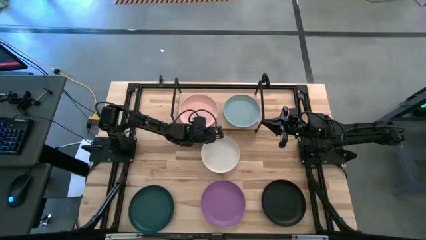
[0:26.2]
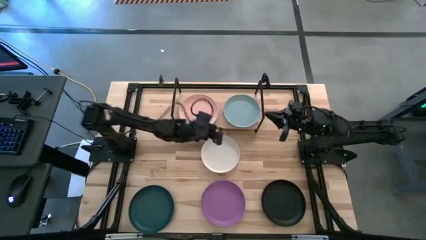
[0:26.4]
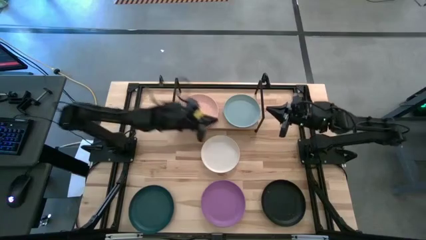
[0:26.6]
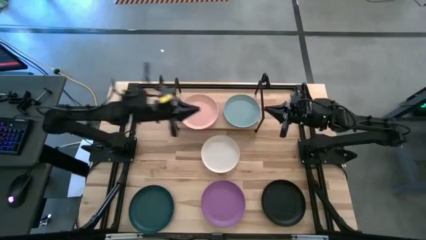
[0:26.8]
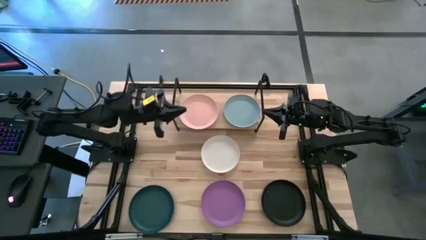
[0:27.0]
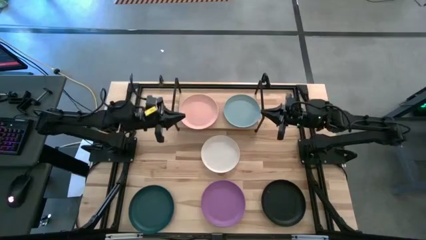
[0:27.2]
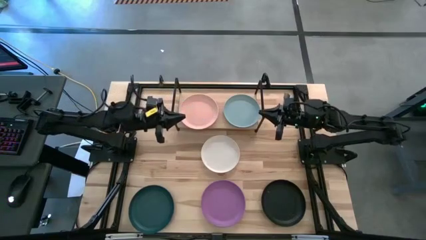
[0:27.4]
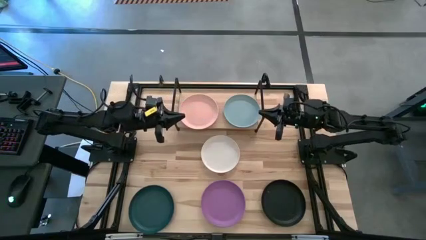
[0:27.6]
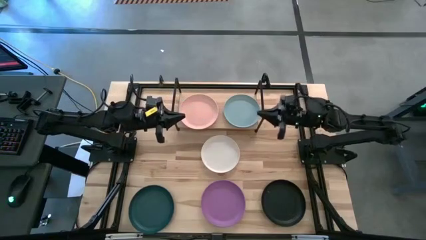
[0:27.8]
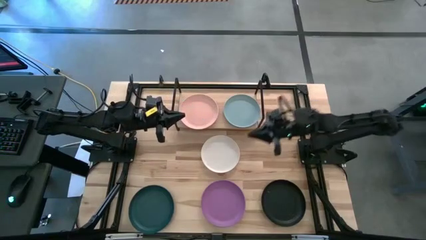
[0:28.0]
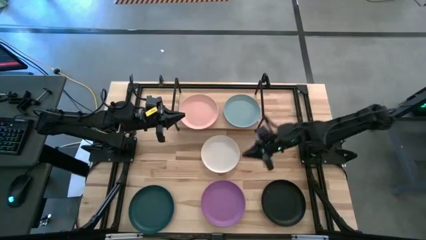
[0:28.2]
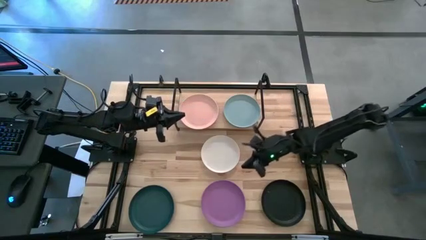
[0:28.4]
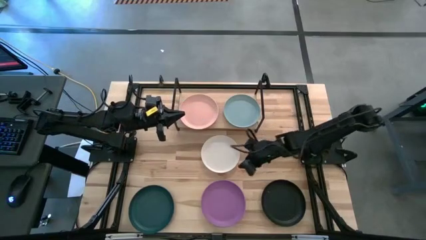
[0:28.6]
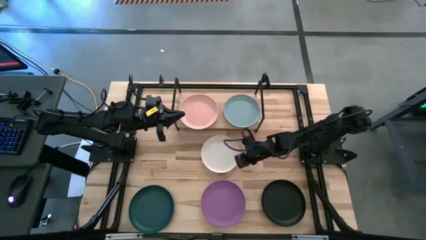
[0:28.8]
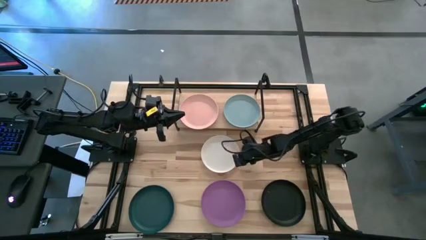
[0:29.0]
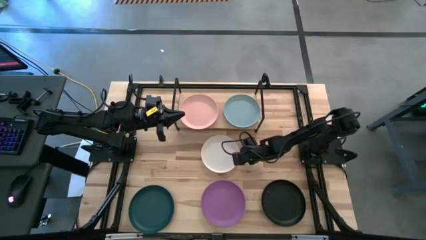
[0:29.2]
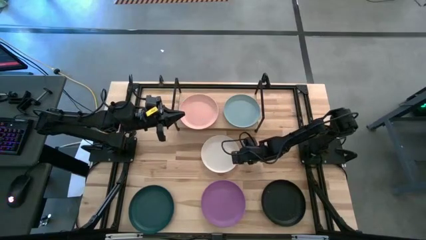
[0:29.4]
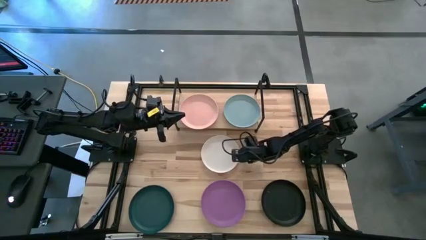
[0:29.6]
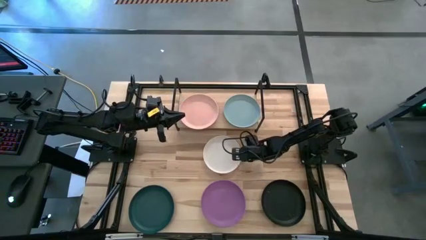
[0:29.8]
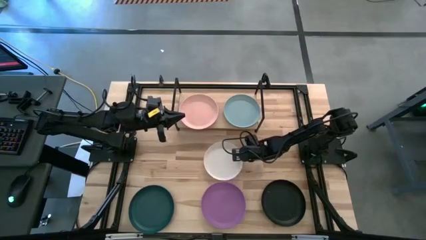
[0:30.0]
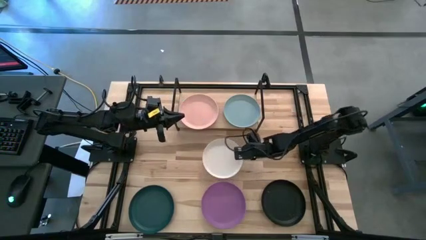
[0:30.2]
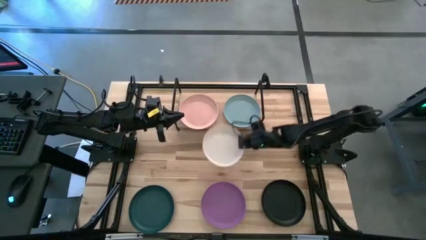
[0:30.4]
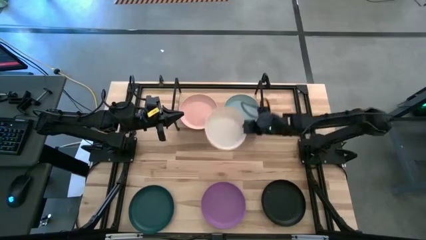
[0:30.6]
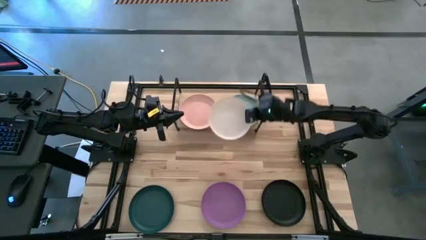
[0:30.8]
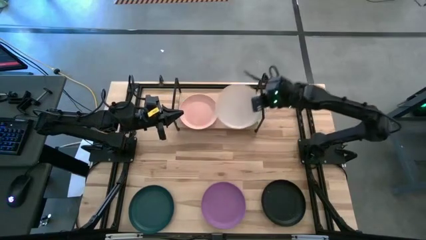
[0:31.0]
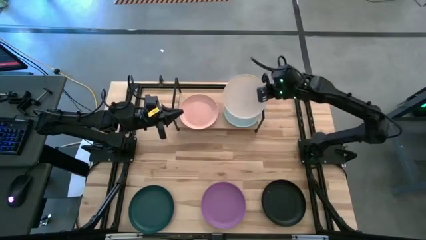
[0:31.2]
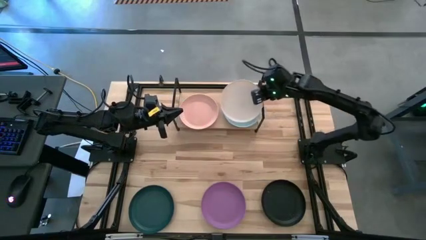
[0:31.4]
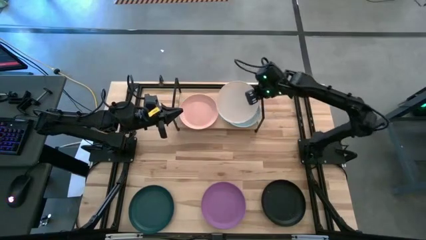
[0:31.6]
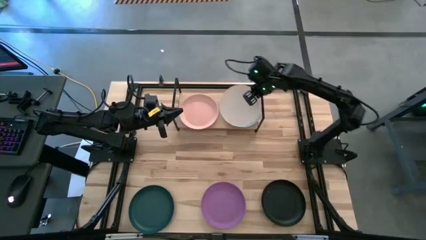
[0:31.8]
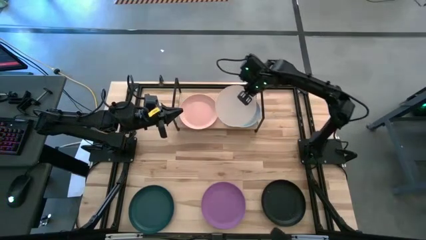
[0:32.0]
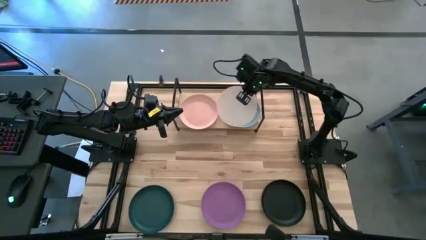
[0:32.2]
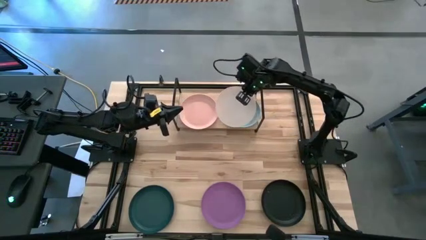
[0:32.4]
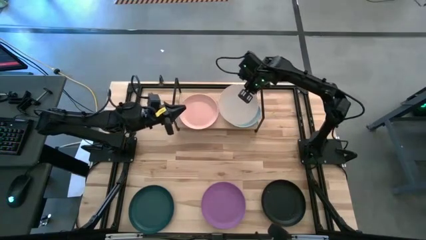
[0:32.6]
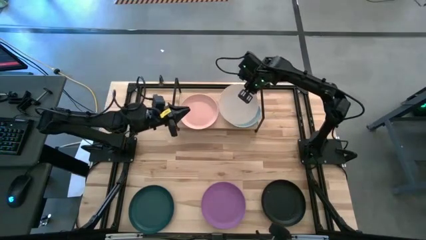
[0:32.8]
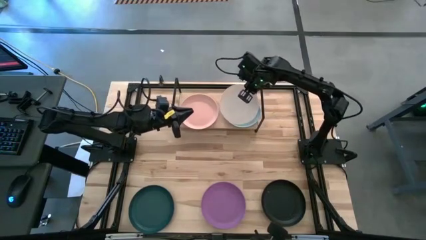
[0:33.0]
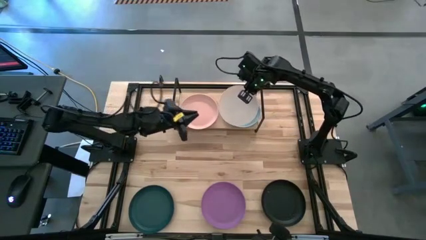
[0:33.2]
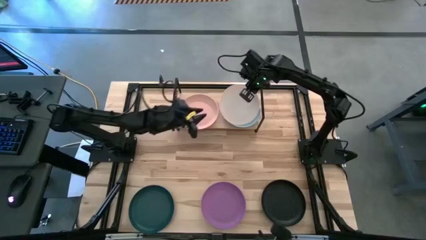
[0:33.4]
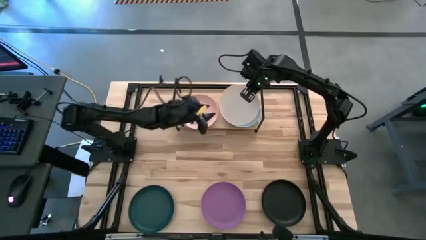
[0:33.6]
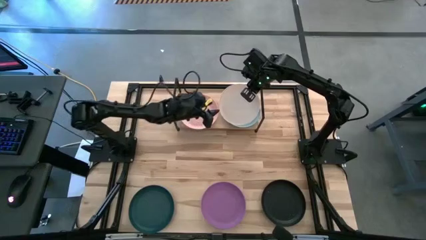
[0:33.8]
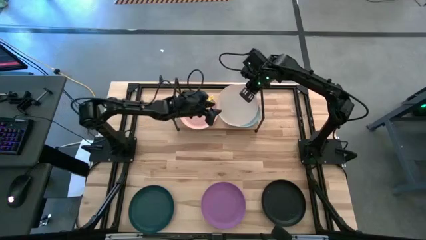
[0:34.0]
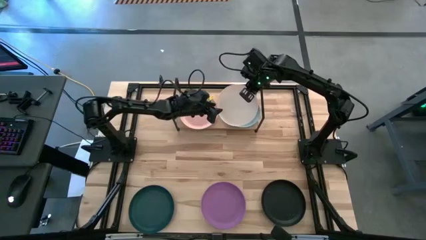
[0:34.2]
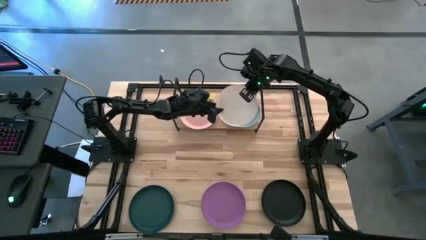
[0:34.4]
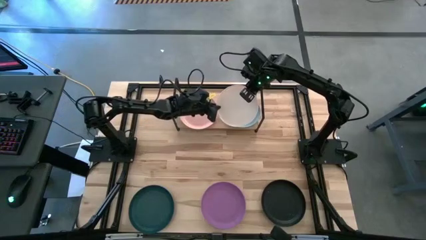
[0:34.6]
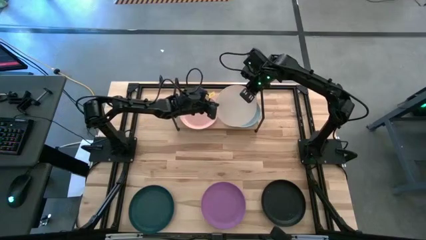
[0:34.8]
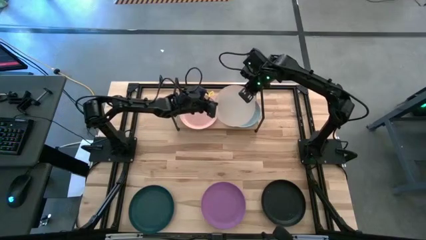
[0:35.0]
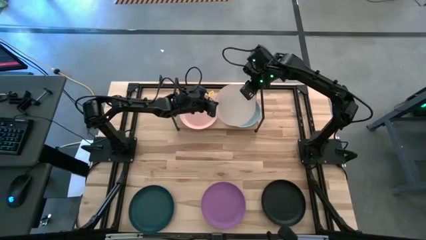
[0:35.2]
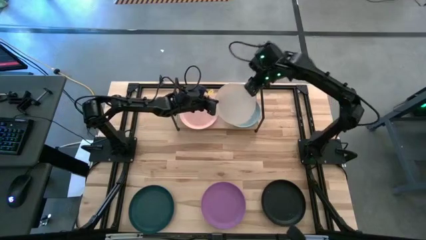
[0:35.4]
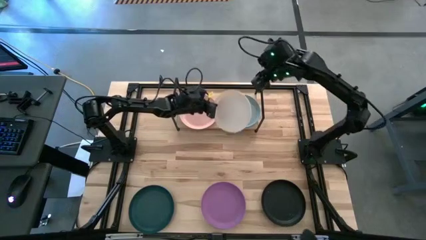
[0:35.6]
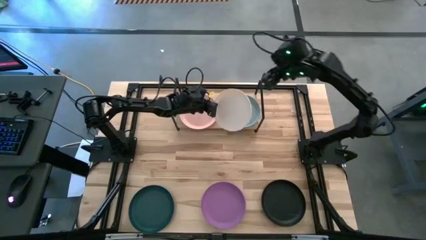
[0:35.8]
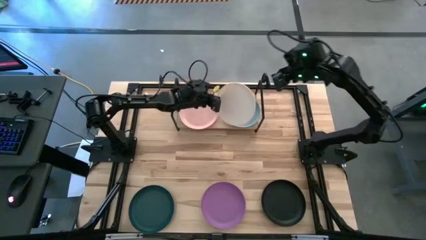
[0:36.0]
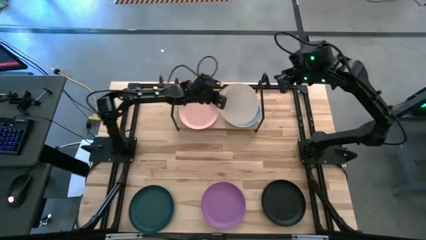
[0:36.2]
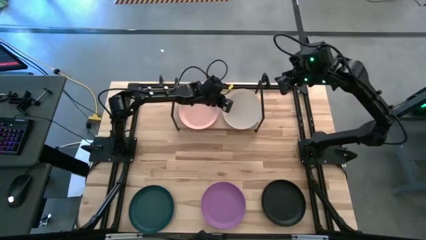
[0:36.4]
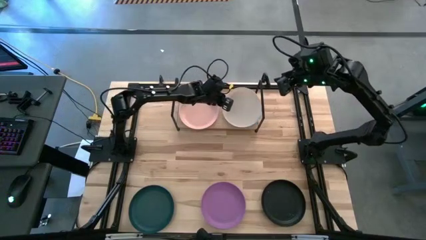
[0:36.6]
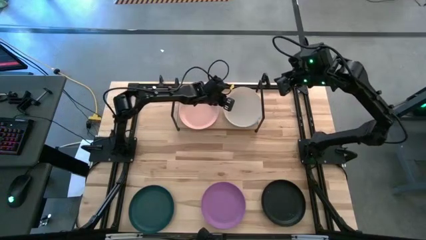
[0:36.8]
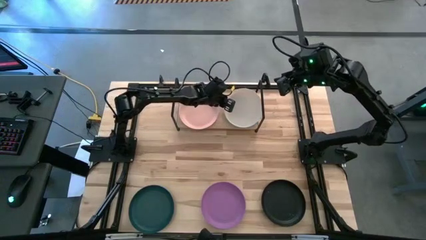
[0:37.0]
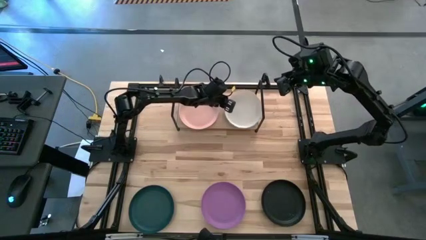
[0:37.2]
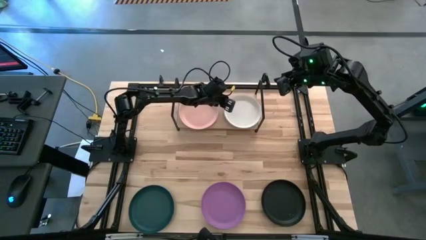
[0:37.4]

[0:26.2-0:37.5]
Task: Place and stack plates onto a shelf
Stack the white plate on top of the light blue plate on the shelf

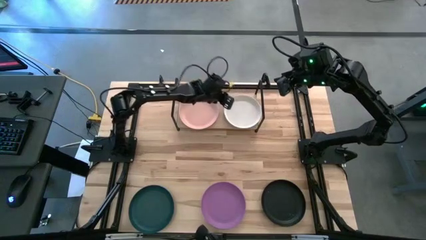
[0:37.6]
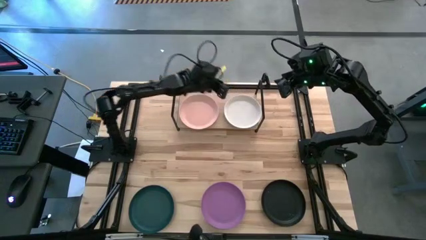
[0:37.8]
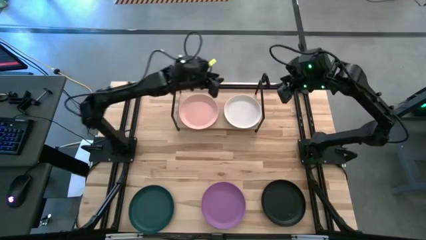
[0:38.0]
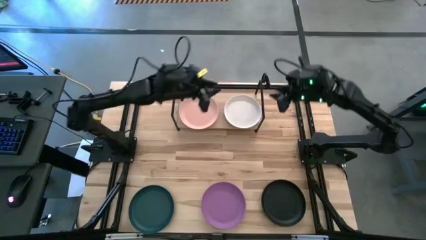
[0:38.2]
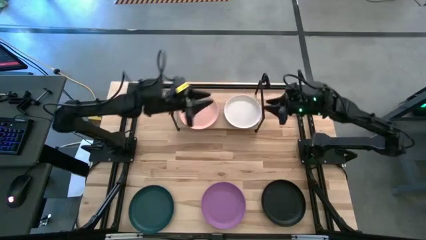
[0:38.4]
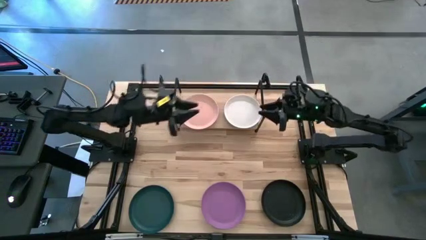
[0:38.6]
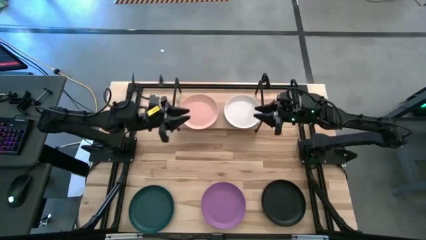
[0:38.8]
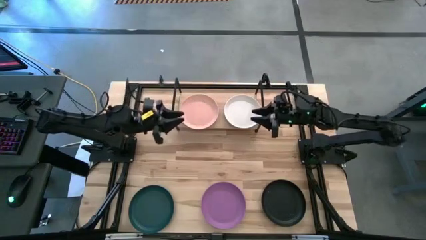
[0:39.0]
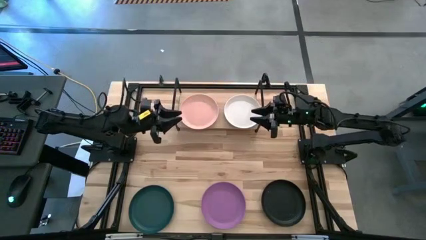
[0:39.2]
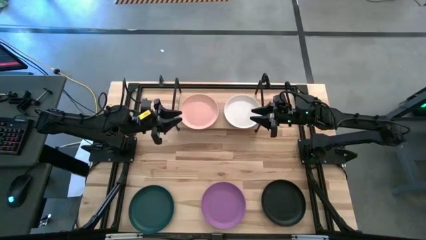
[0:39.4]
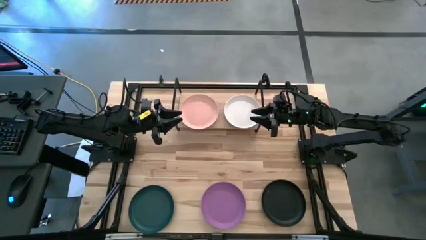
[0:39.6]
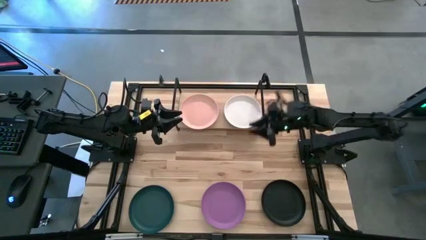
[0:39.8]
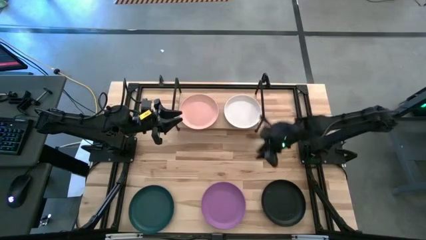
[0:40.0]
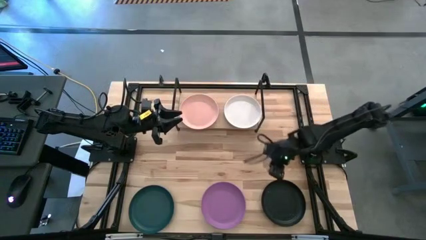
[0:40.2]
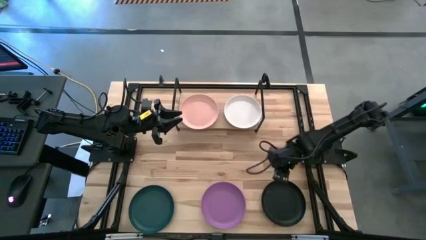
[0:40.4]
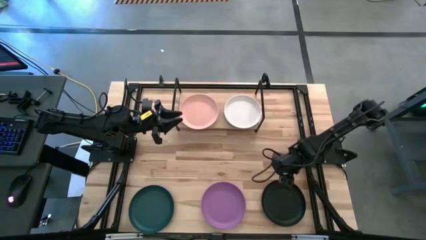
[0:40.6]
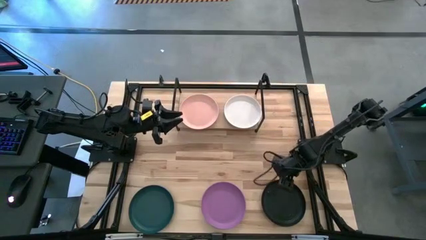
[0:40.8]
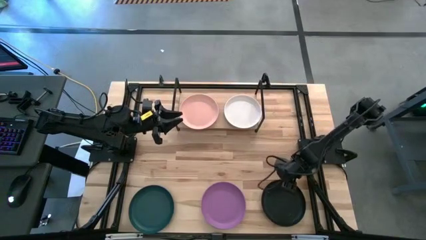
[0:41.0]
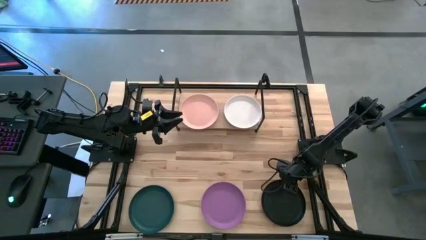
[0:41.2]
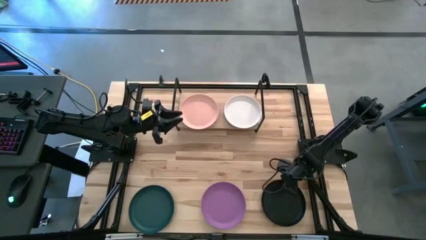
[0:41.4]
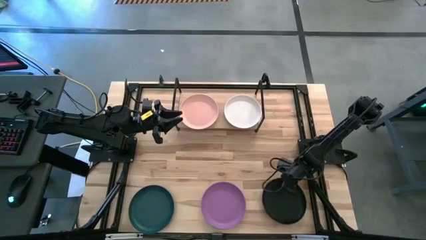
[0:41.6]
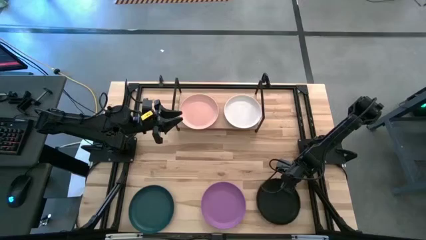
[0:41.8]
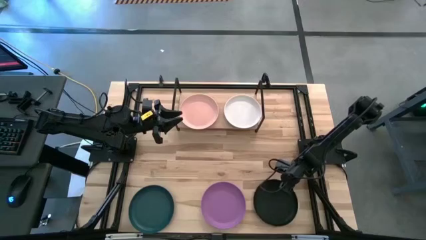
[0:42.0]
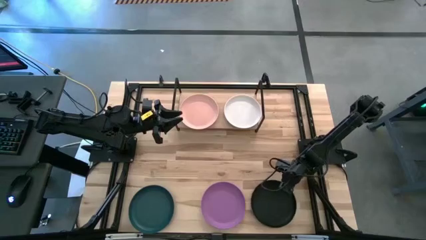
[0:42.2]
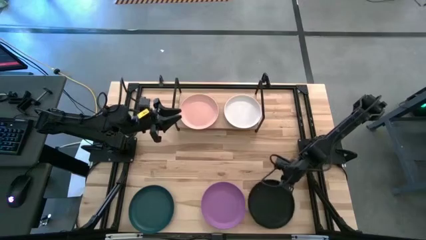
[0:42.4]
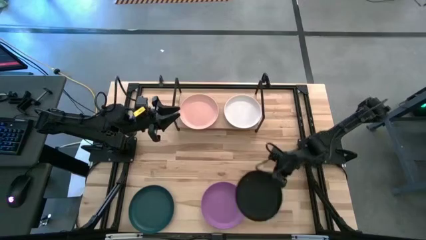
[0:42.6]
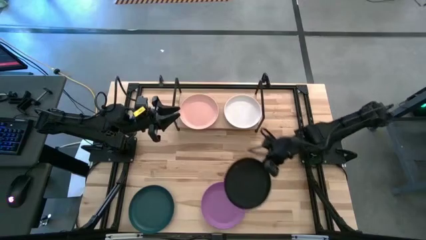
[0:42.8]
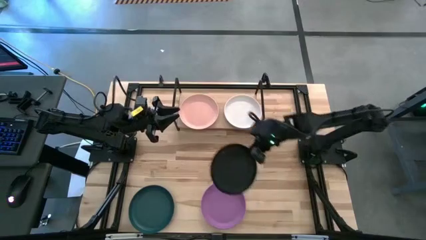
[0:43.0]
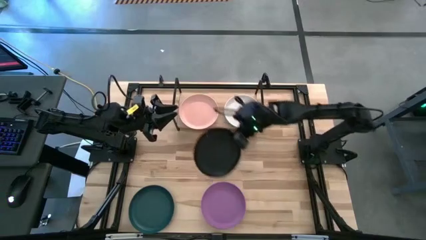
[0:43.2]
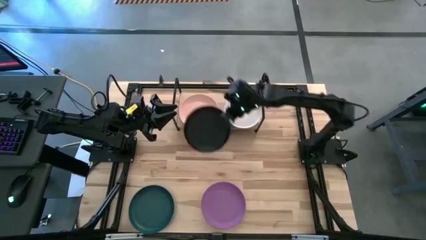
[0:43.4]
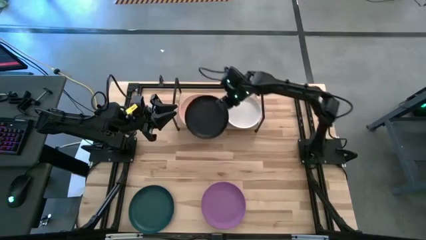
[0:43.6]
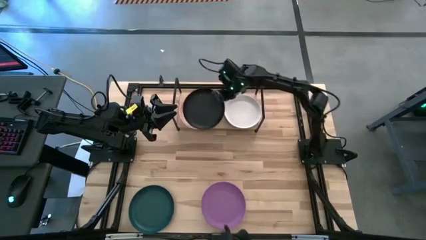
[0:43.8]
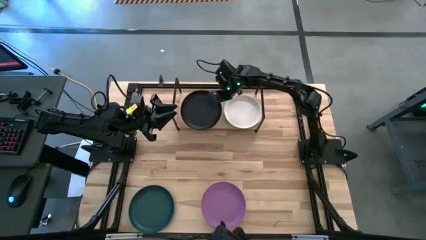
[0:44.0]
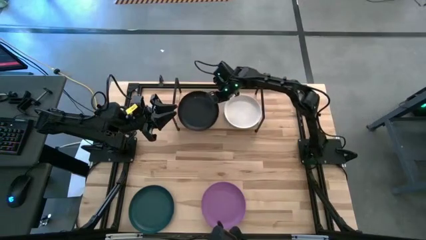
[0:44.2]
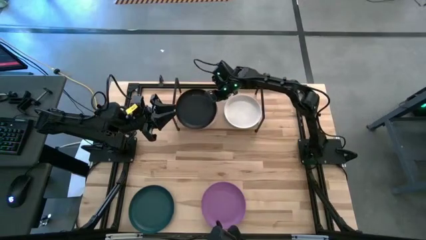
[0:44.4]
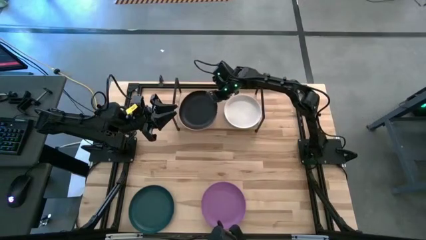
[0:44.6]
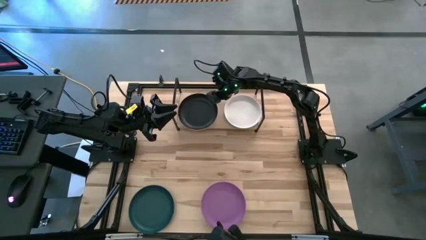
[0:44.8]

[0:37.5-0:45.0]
Stack the black plate on top of the light orange plate on the shelf
